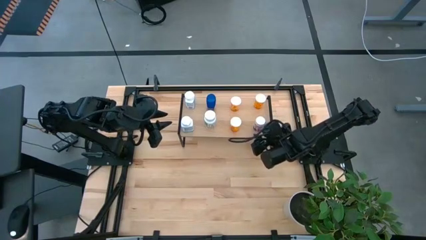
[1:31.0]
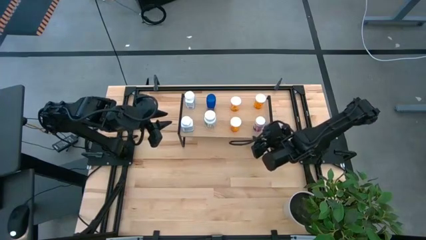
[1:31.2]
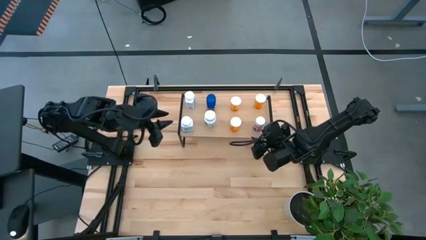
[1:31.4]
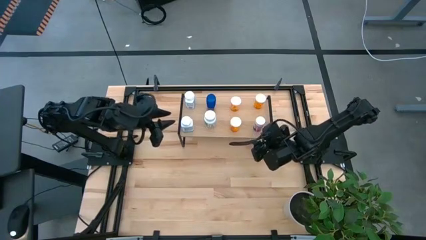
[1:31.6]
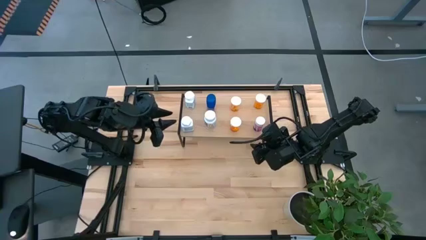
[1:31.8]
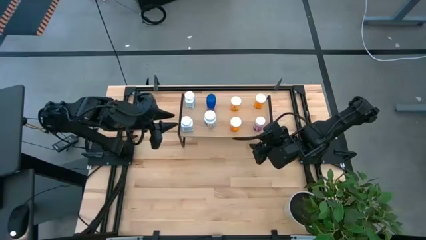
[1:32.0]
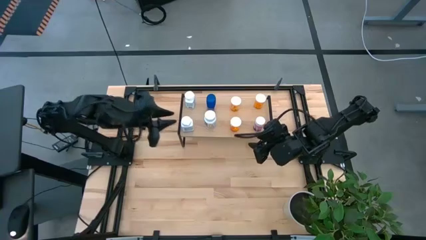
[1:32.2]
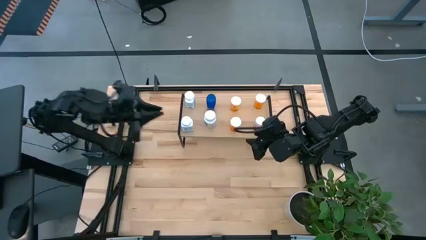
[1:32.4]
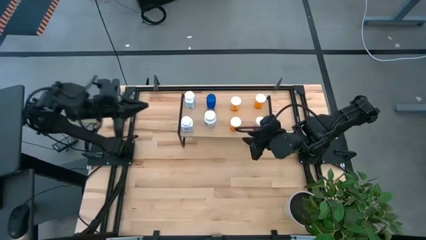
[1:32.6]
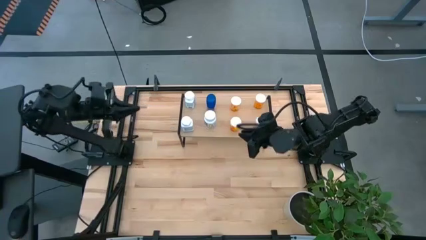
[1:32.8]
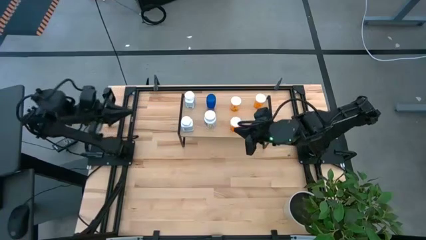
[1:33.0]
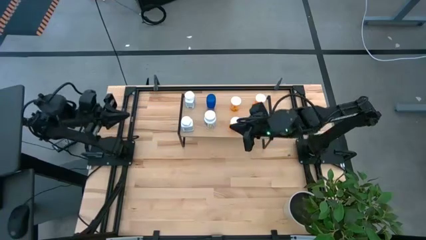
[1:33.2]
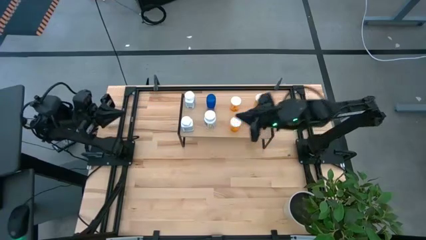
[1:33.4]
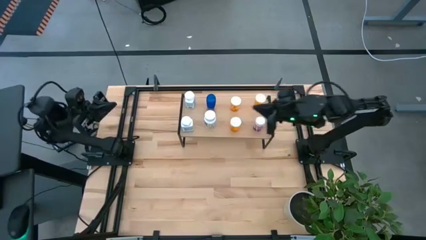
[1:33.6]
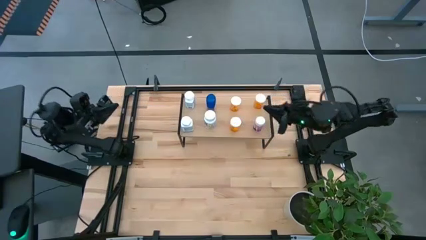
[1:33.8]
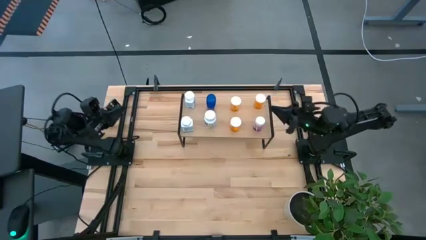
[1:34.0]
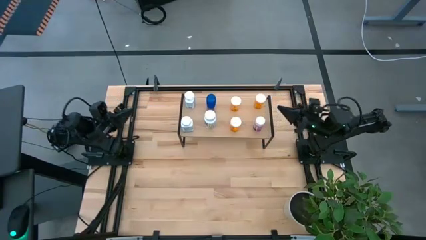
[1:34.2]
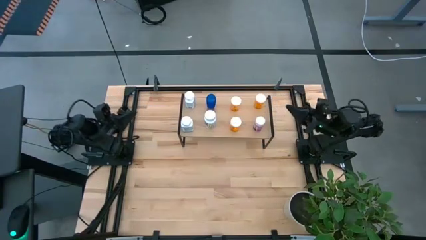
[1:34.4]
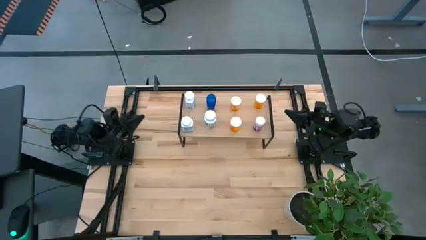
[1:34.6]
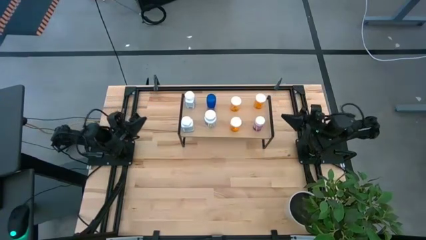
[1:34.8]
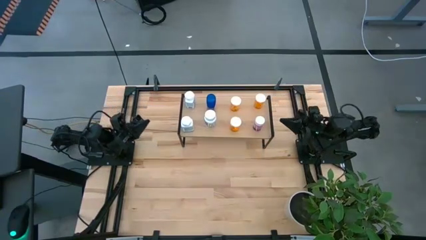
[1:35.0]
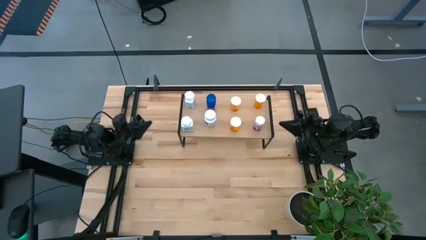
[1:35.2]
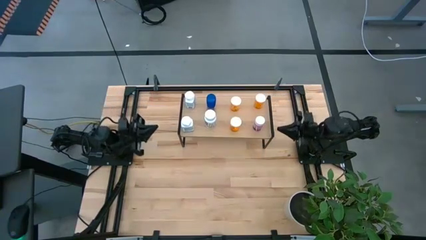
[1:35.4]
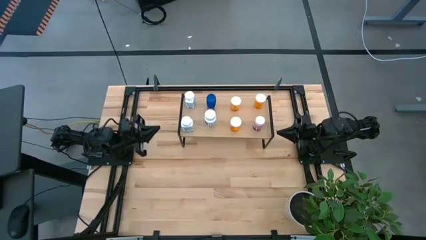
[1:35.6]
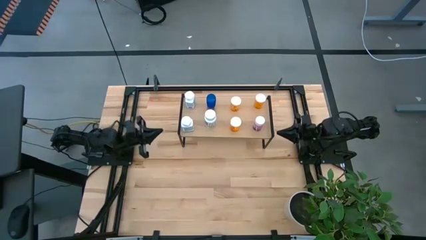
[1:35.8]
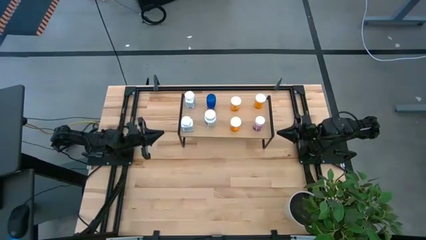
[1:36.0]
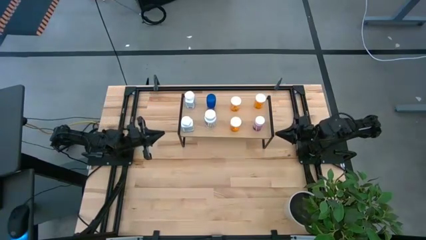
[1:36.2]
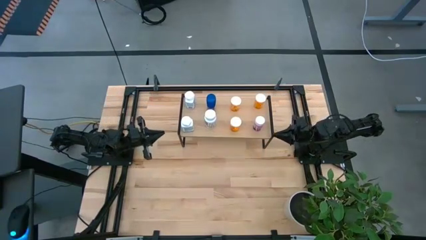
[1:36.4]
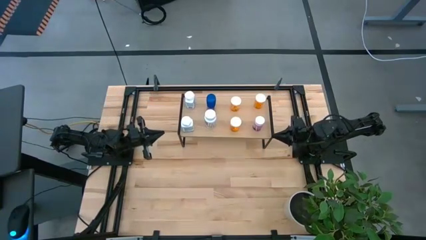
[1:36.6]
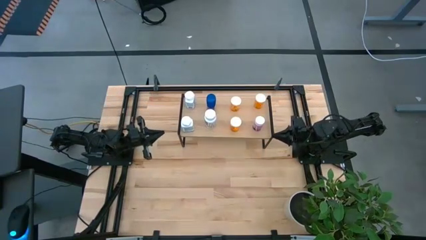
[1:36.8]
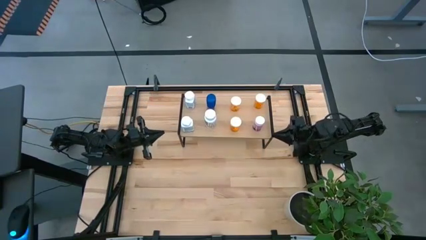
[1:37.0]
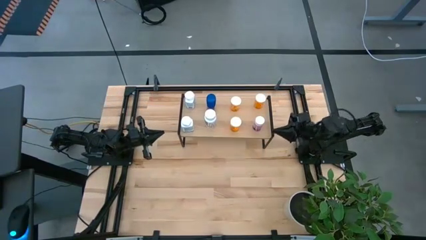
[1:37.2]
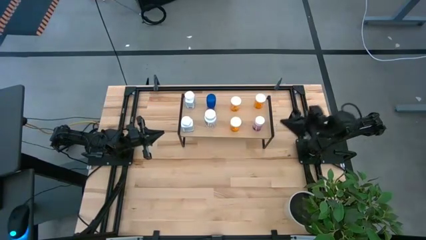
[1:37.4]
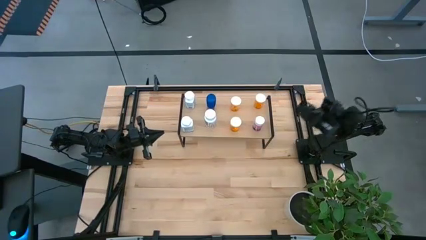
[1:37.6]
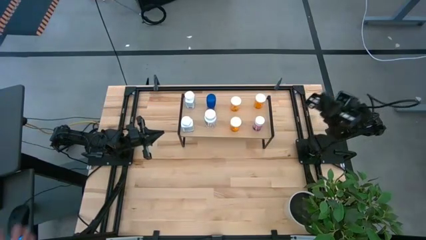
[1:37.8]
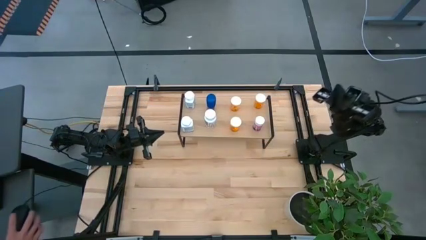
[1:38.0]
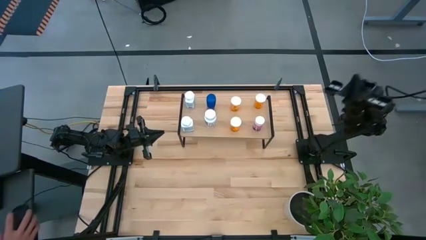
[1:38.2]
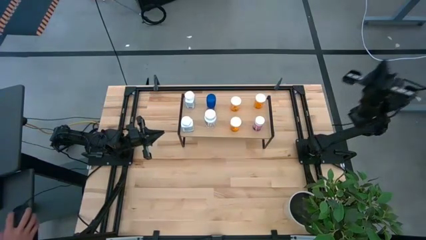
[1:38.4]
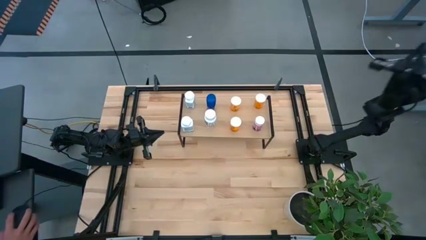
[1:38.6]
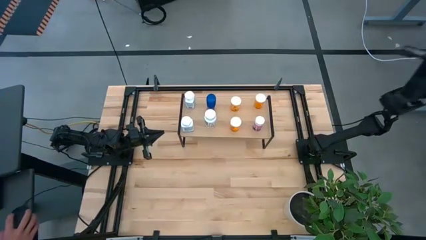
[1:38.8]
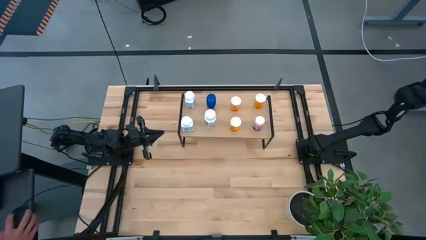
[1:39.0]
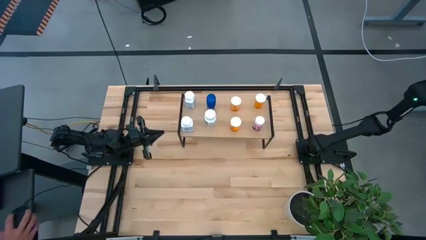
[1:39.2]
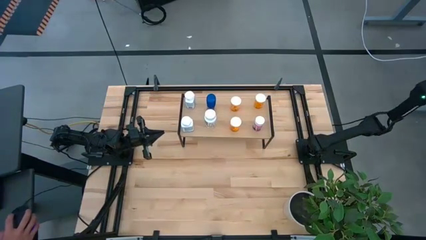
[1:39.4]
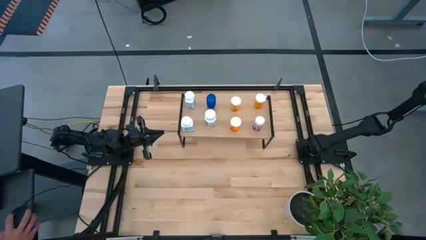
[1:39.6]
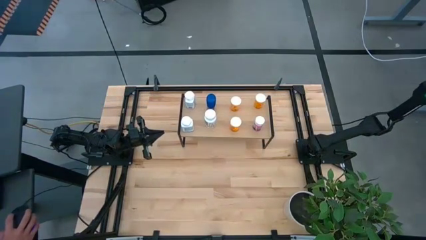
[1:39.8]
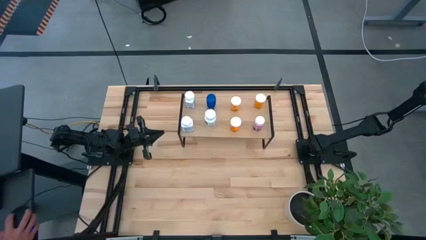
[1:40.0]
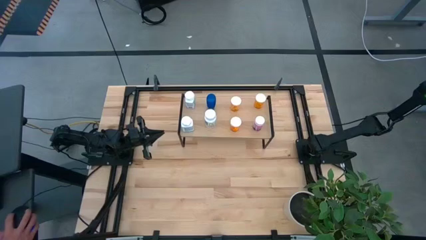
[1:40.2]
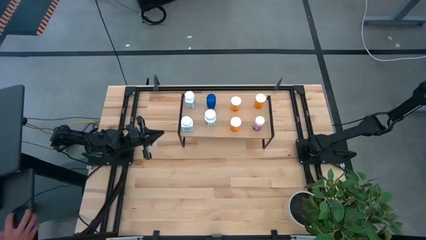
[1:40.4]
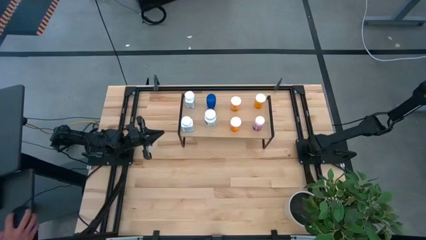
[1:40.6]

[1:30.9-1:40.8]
Task: Pick and place medicine bottles onto shelf by color
Return to Home Position

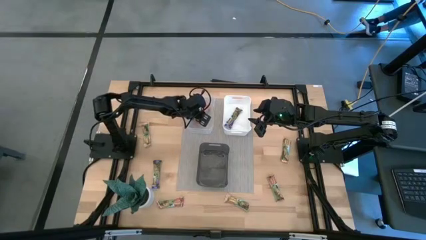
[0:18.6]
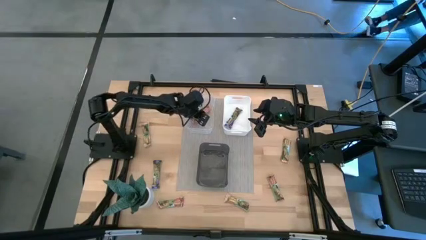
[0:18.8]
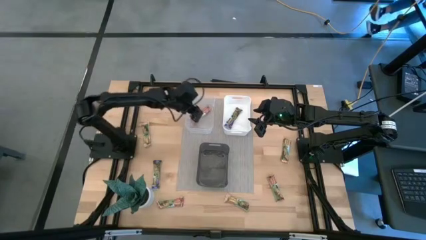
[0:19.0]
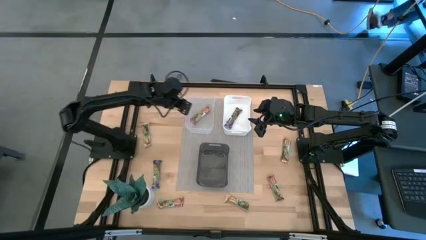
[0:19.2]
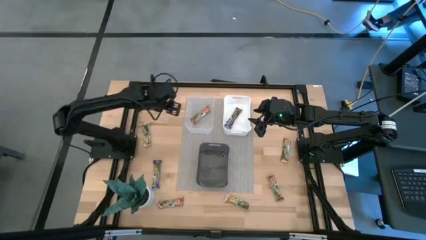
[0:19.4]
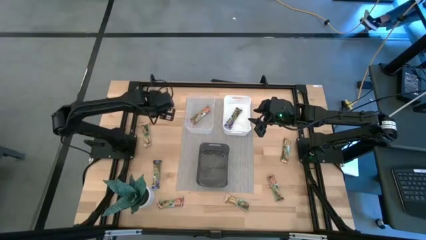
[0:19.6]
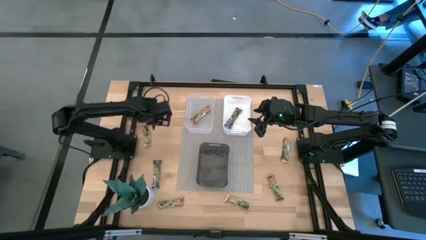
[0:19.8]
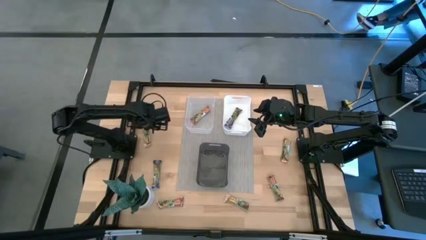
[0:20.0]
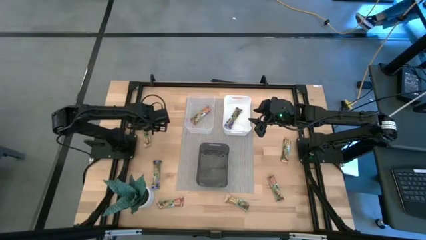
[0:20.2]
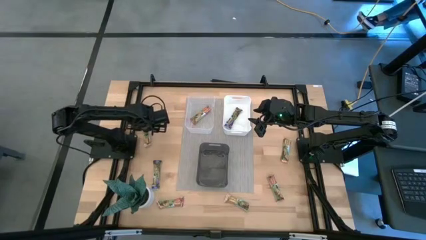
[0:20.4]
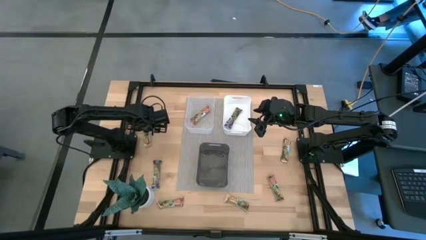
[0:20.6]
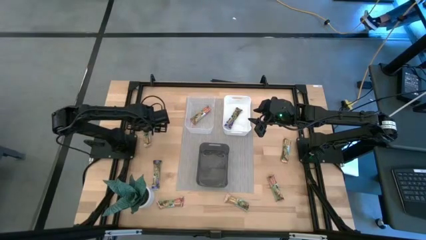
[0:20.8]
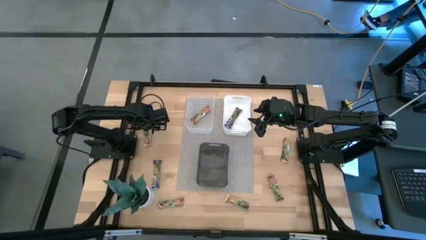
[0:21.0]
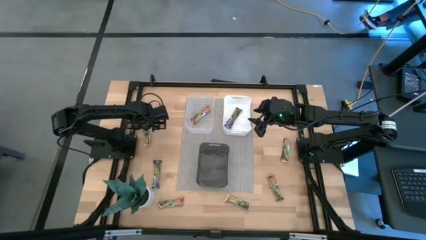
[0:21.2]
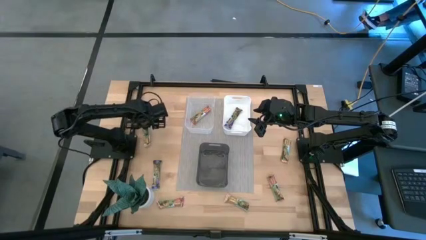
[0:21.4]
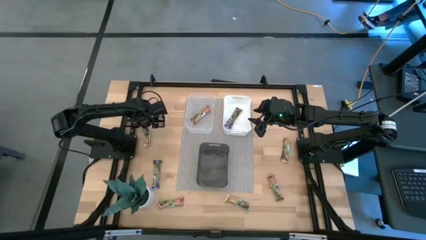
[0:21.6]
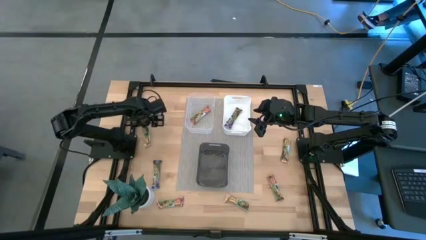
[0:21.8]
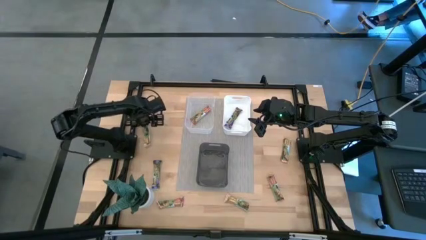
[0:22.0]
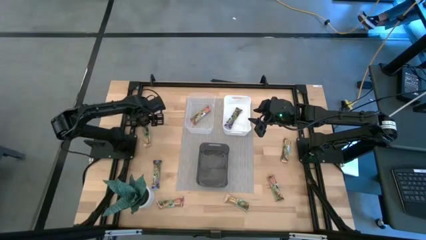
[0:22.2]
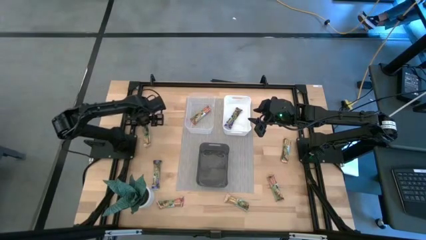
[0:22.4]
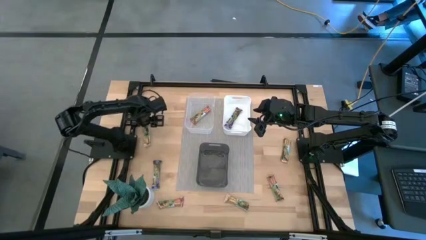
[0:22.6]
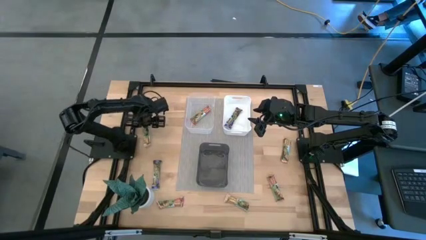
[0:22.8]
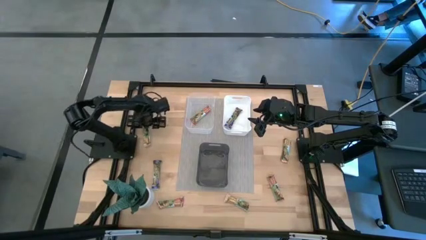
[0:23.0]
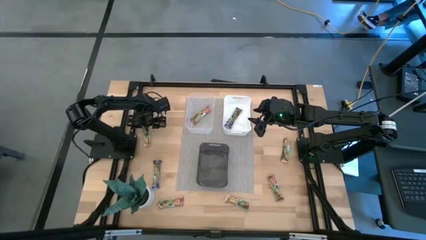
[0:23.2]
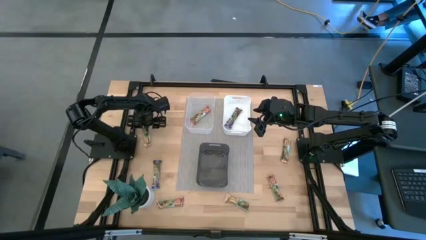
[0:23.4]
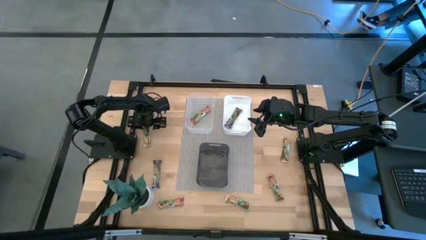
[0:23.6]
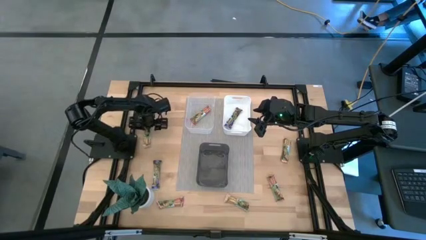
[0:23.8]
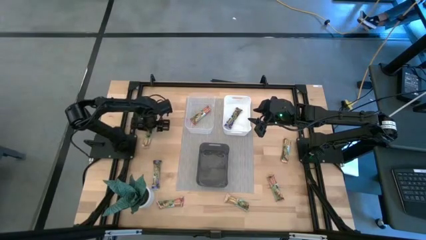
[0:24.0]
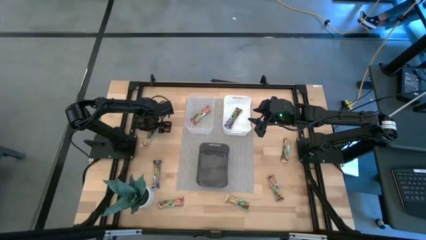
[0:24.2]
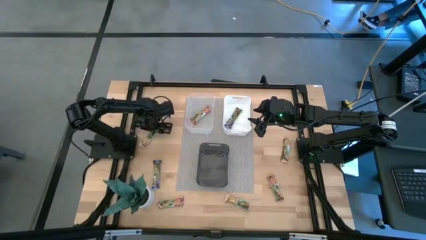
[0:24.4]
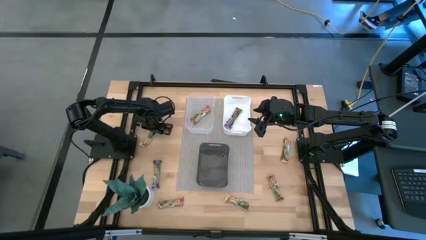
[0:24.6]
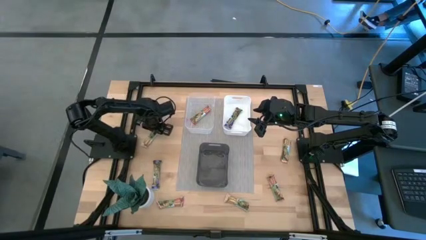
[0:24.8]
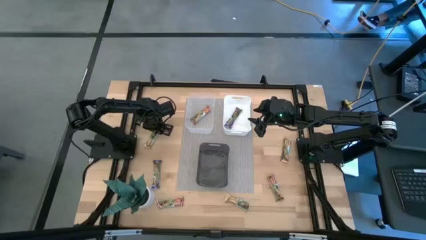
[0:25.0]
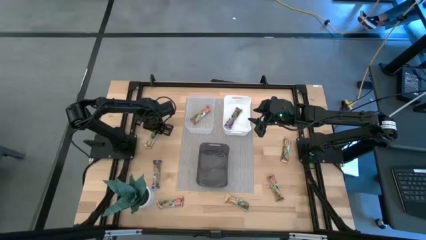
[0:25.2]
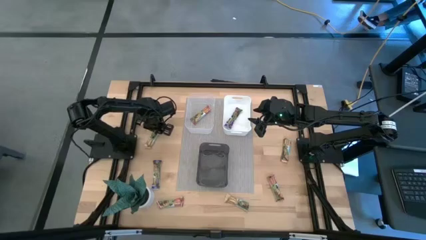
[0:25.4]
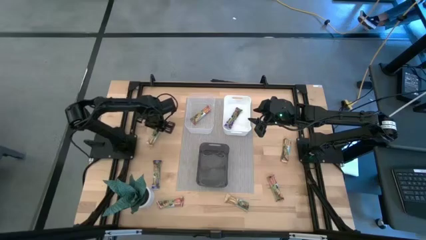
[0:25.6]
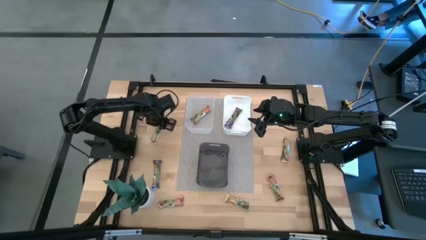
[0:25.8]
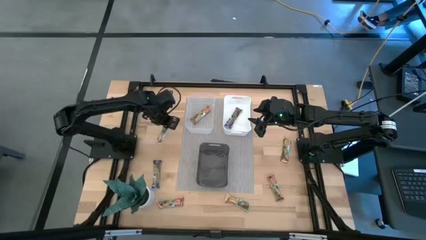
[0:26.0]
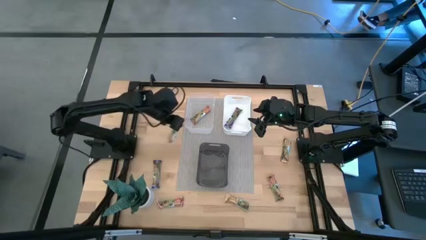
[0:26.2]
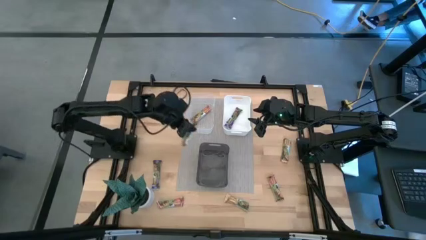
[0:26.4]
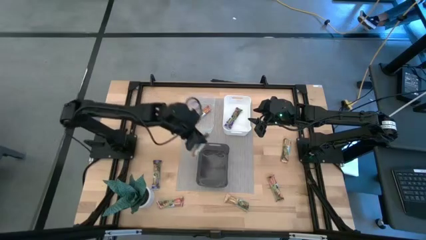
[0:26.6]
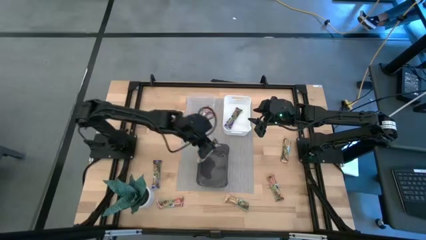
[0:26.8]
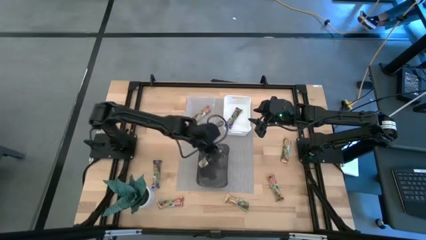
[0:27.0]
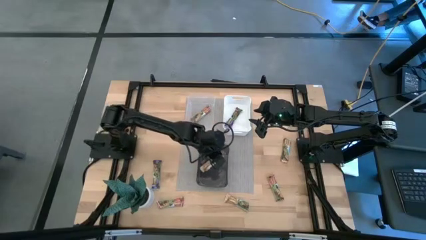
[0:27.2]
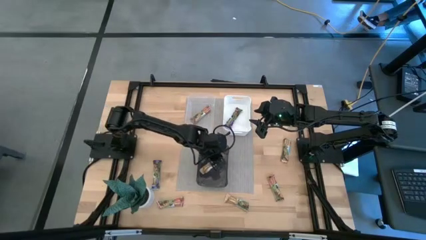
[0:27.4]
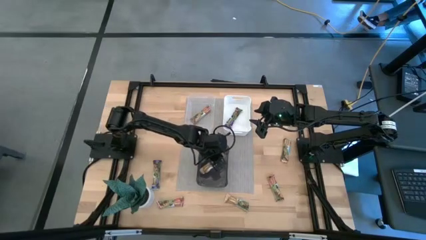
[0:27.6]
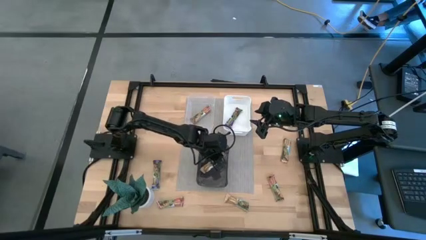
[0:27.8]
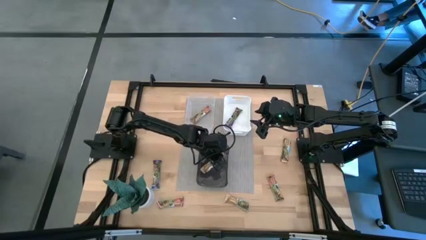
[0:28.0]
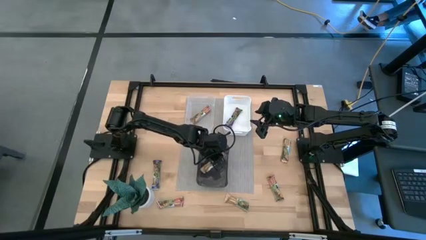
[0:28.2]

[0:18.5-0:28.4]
Task: Pick and place Granola Bars by type
Put the left yellow granola bar into the black bin
